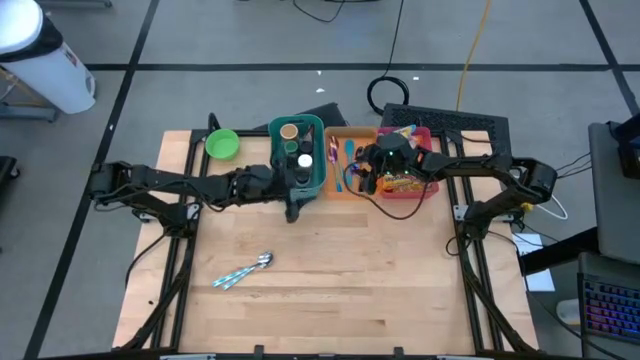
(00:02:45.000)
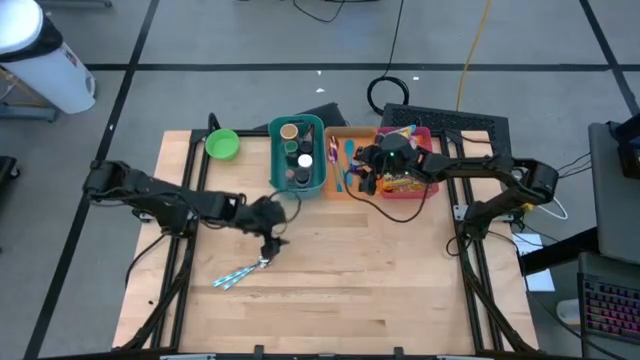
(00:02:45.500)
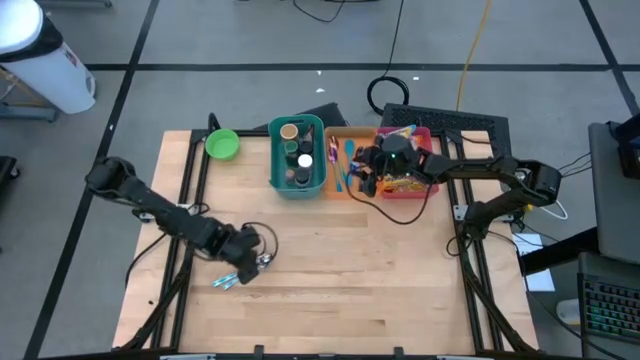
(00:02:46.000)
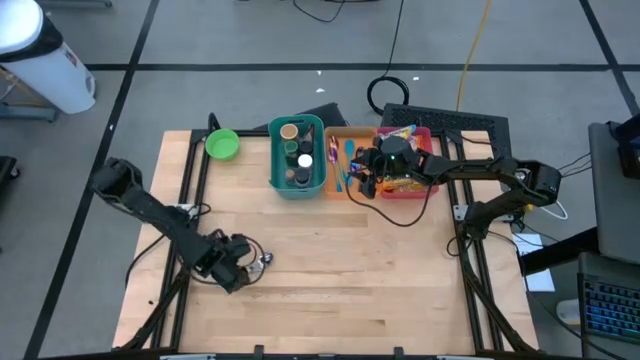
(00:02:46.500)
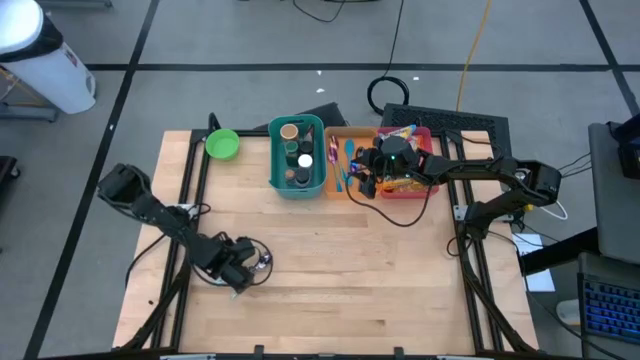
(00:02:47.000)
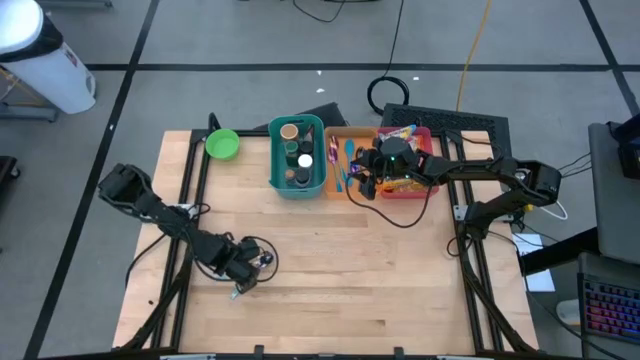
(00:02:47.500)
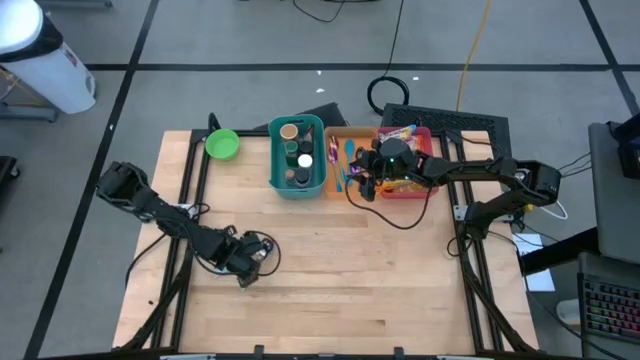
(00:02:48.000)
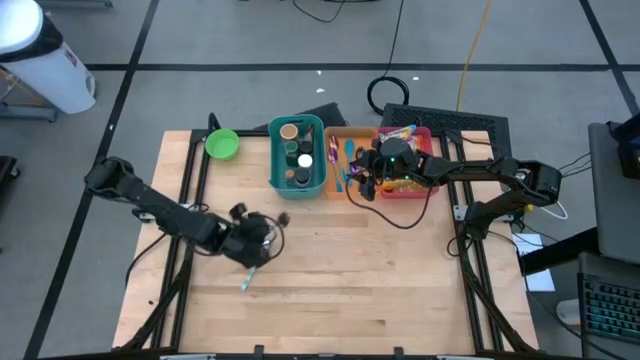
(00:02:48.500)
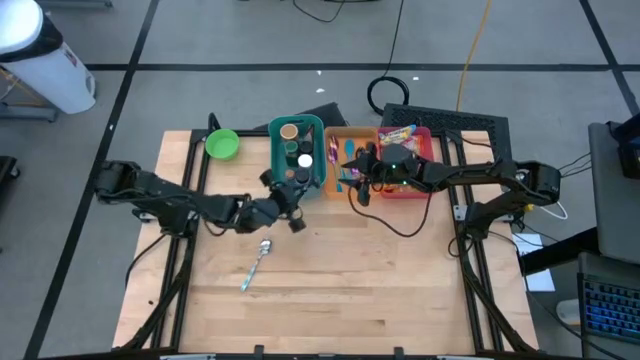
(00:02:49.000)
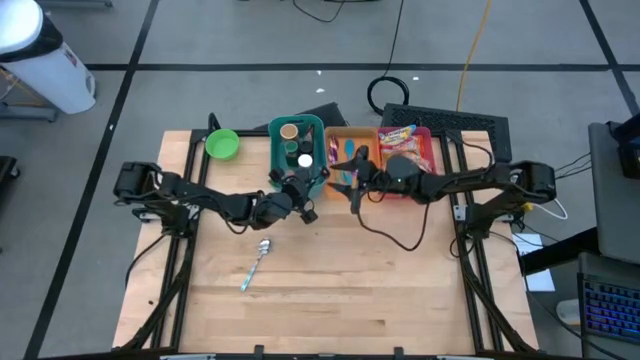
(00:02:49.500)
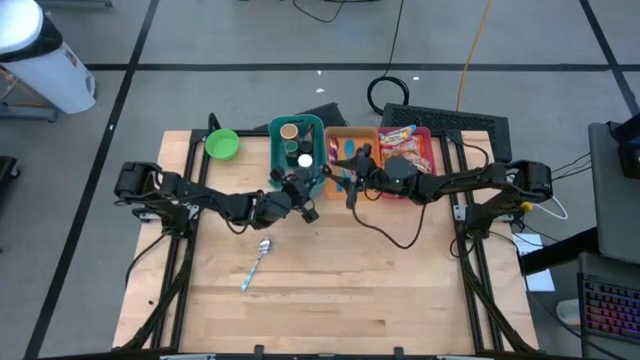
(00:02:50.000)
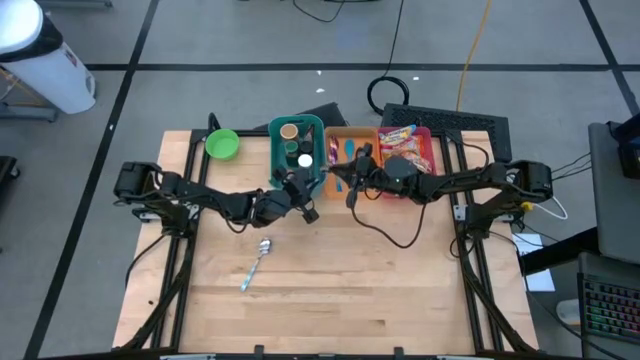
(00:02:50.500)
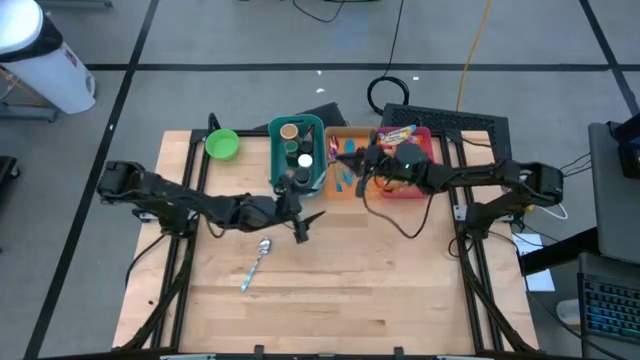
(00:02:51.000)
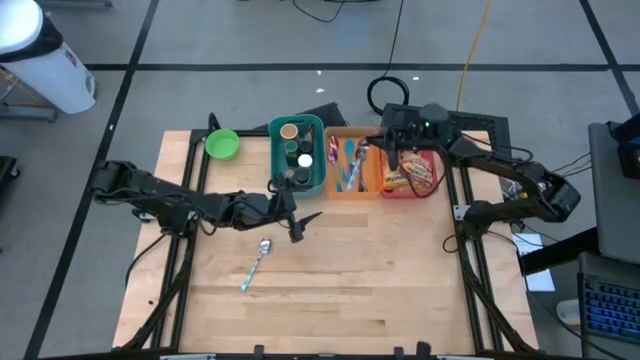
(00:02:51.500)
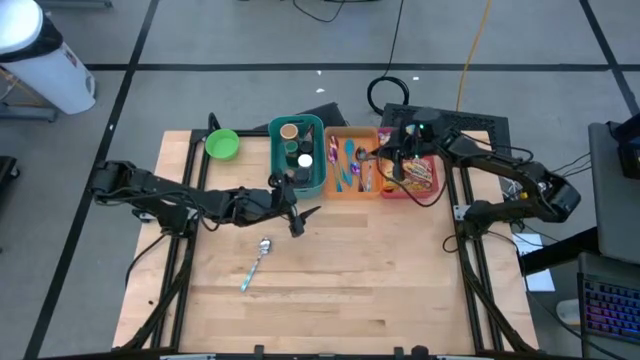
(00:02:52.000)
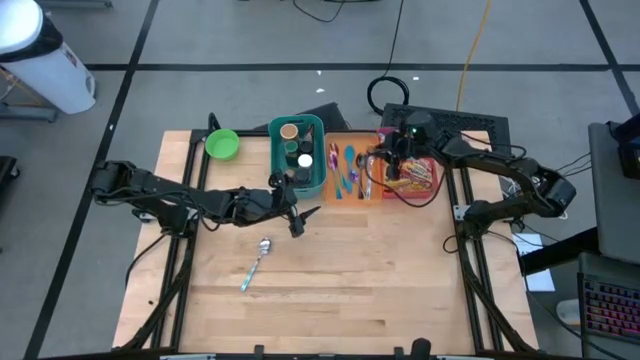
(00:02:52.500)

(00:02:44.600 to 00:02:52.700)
Task: Pick & Place Food Item
Put the left white patterned spoon into the orange bin

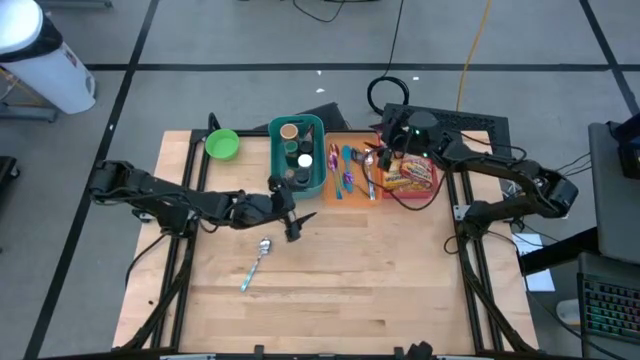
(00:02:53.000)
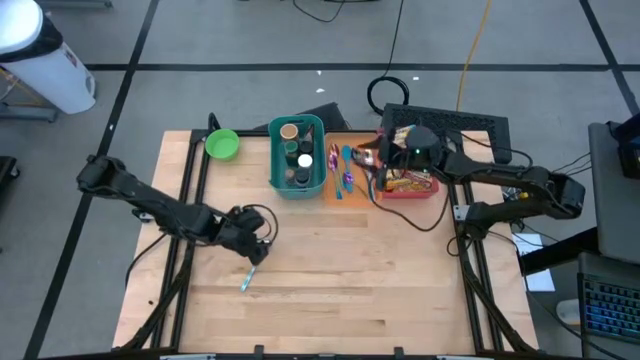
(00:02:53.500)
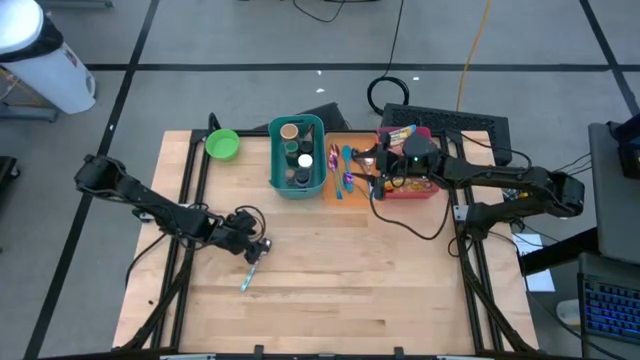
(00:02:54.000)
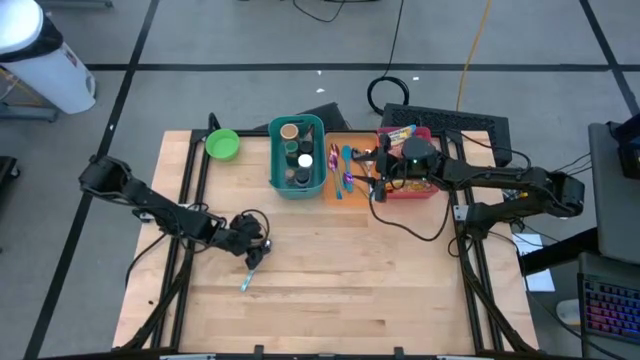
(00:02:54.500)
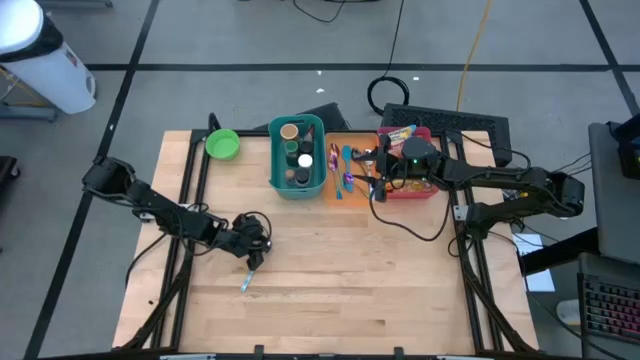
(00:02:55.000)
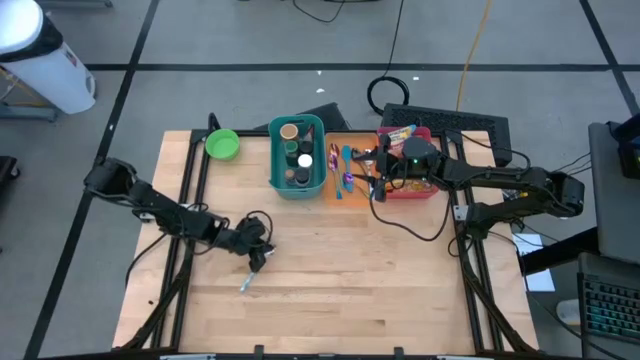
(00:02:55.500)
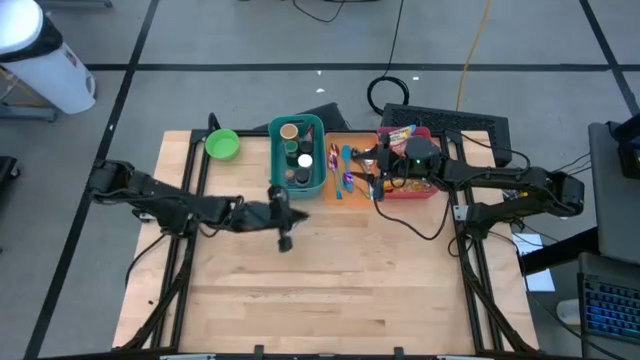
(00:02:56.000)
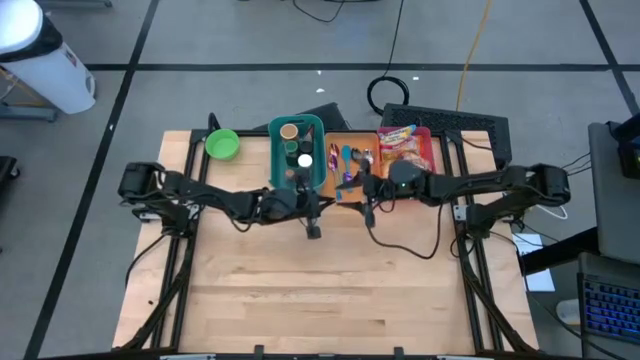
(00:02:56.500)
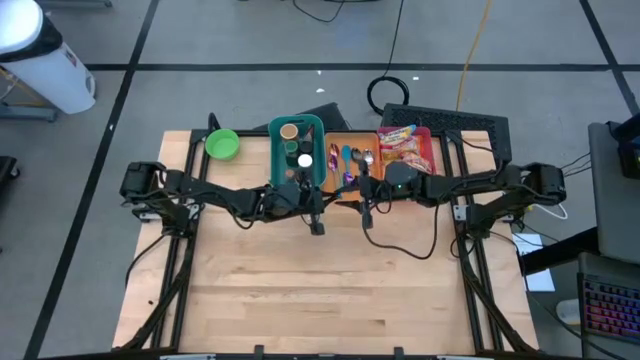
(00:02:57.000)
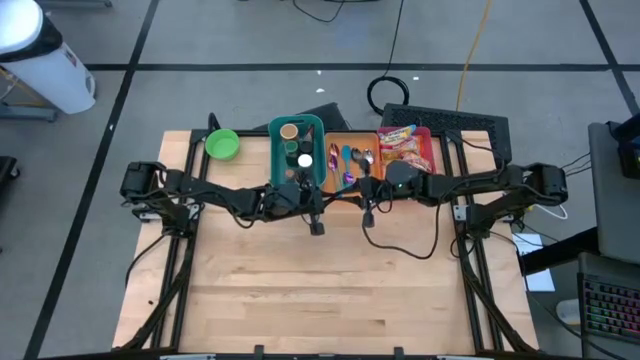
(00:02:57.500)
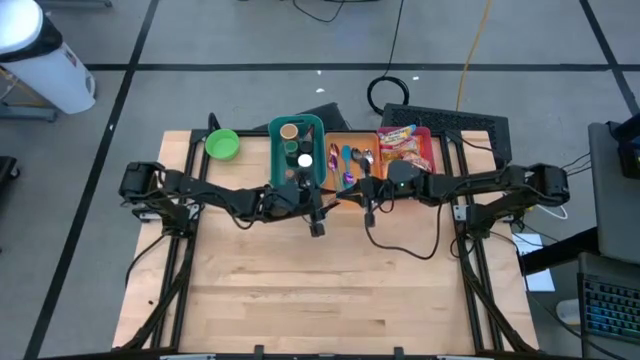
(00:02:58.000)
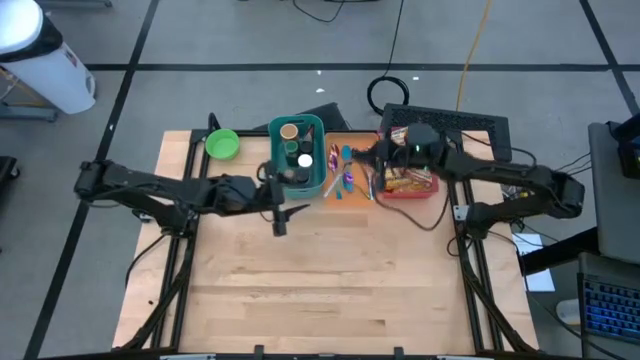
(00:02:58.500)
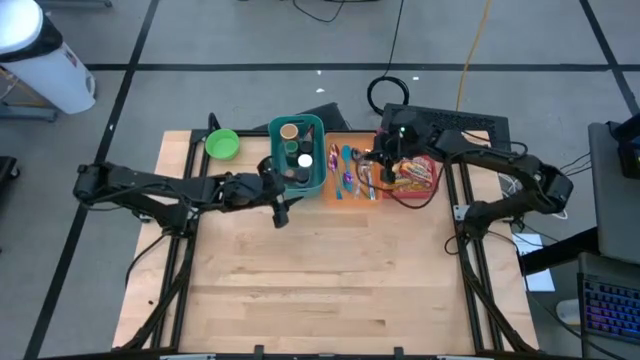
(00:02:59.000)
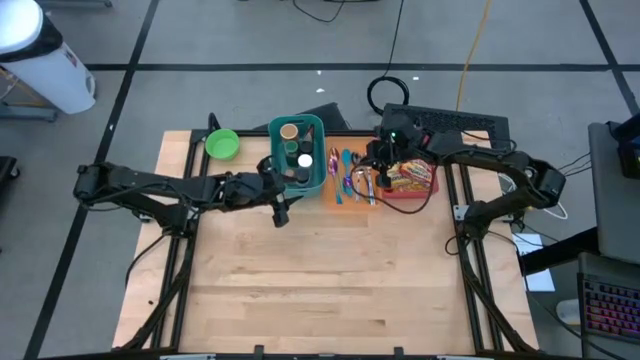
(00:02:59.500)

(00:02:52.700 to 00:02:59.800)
Put the white patterned spoon into the orange bin

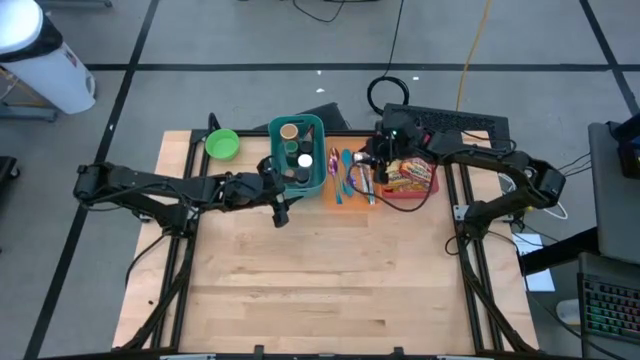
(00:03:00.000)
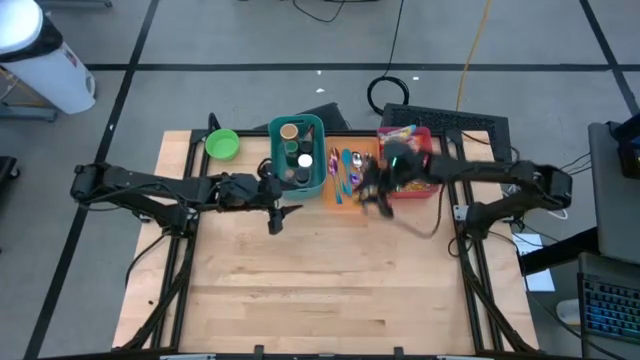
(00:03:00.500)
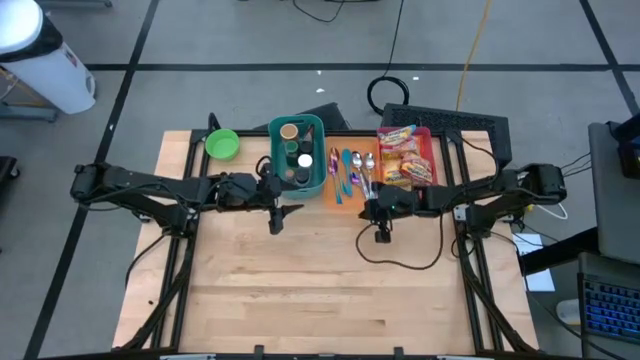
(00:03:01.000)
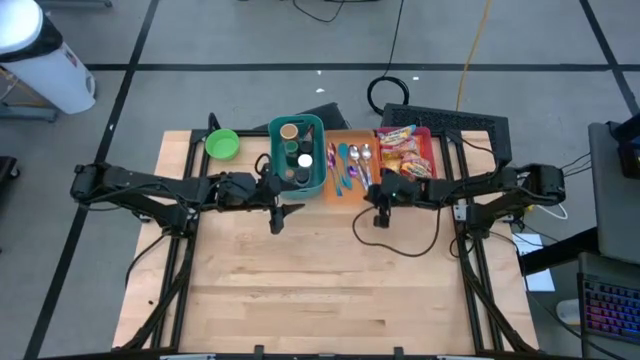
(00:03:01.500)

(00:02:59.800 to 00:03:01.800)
Adjust the orange bin

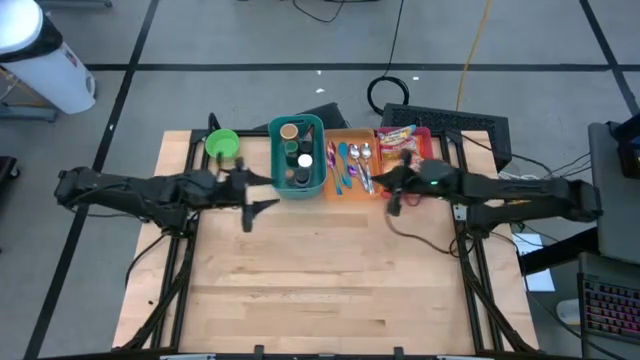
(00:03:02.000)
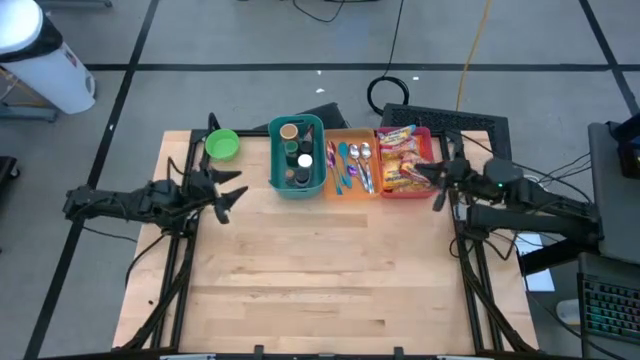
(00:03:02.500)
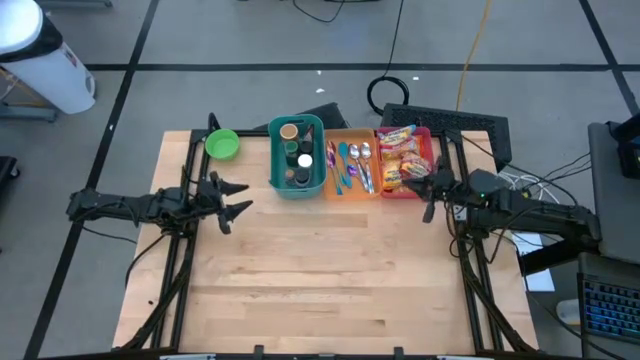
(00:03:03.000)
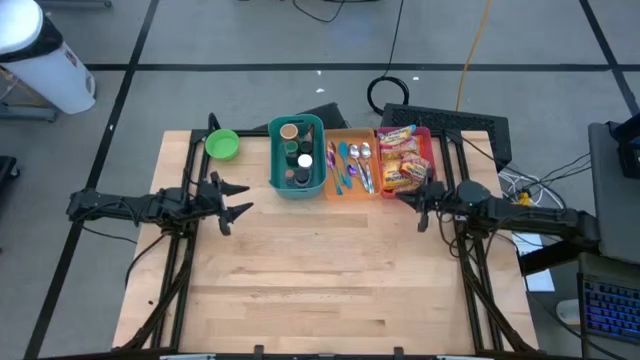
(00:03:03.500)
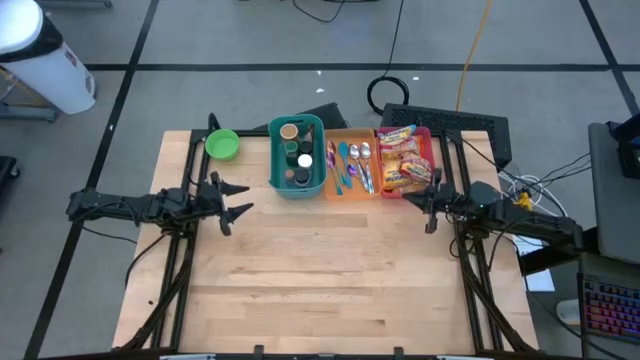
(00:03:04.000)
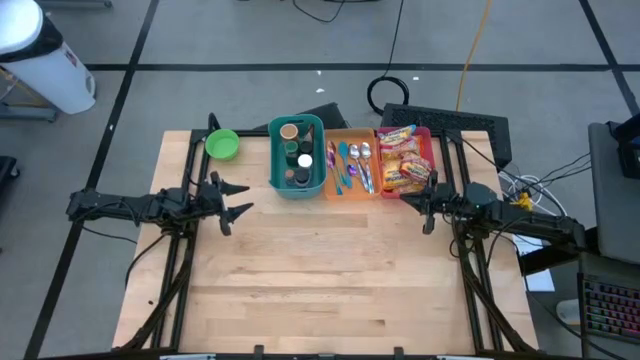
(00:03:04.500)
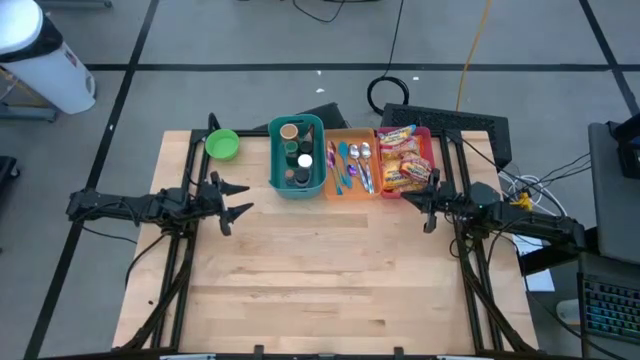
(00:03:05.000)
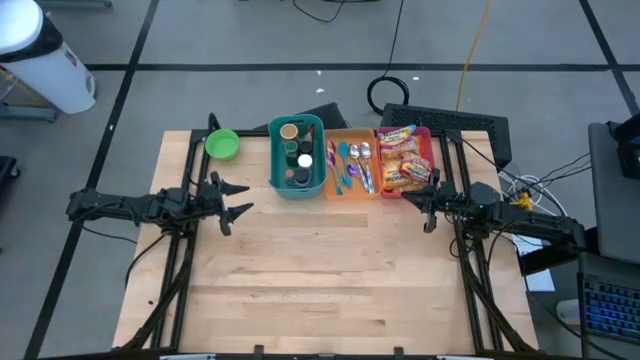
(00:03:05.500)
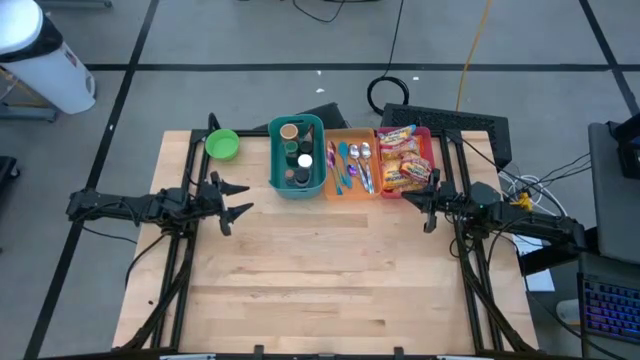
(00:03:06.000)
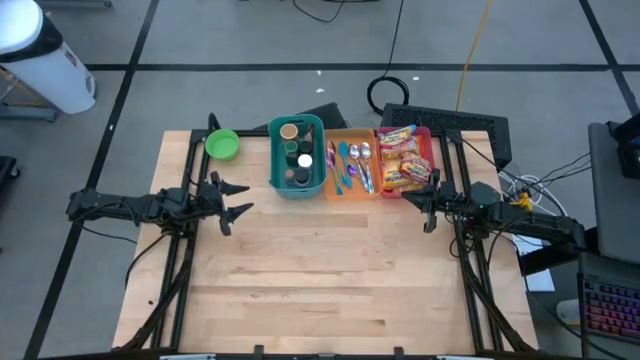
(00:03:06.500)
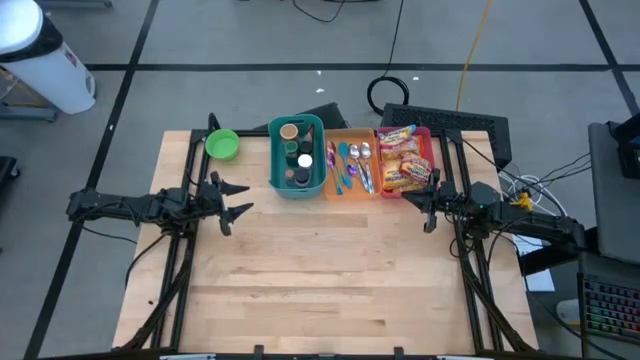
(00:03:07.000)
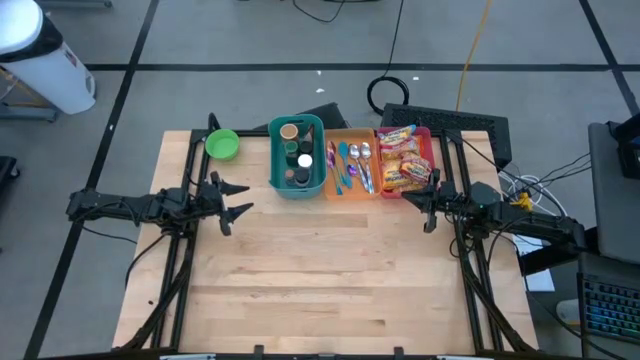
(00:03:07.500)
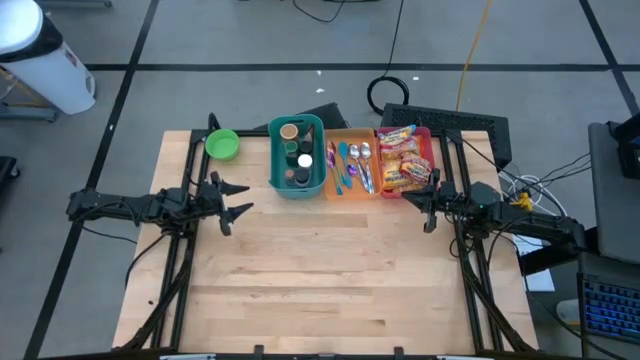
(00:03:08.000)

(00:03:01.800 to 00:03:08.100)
Return to Home Position
